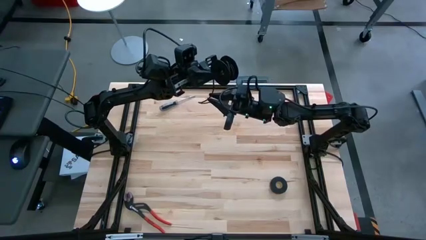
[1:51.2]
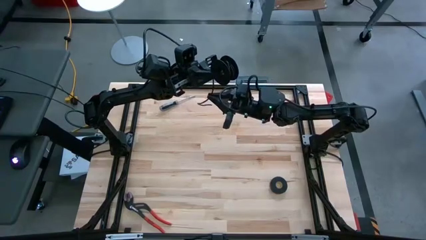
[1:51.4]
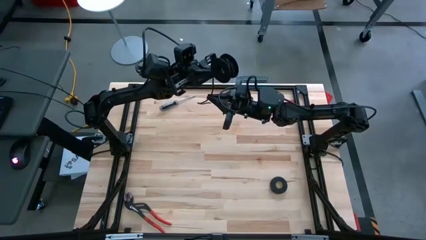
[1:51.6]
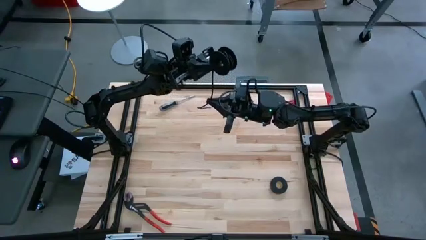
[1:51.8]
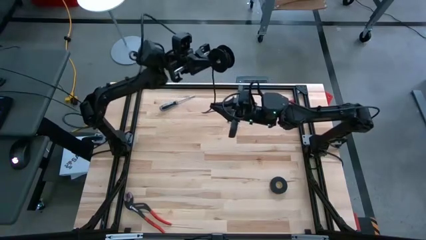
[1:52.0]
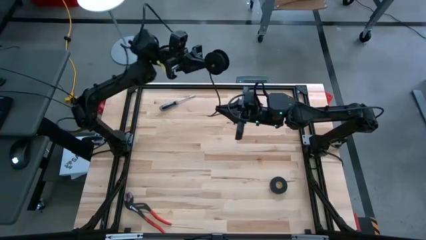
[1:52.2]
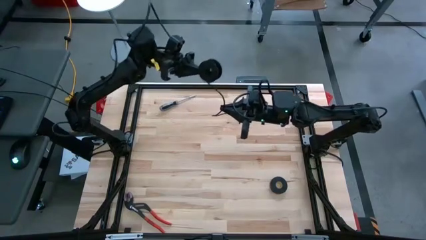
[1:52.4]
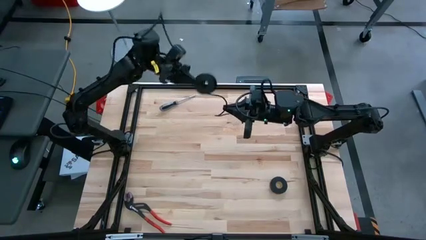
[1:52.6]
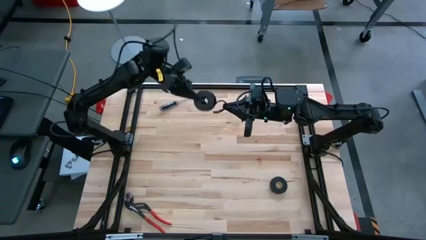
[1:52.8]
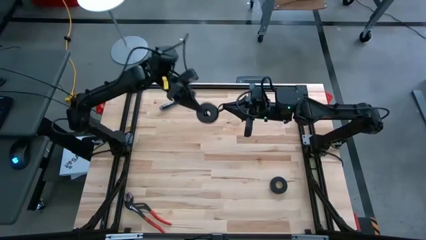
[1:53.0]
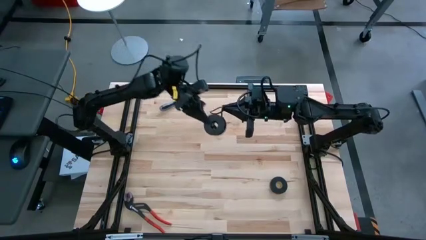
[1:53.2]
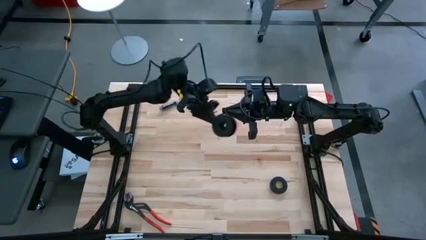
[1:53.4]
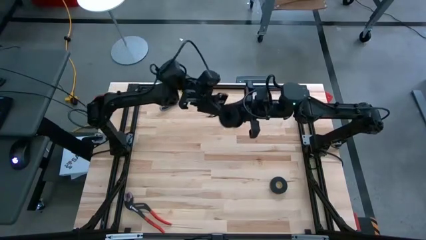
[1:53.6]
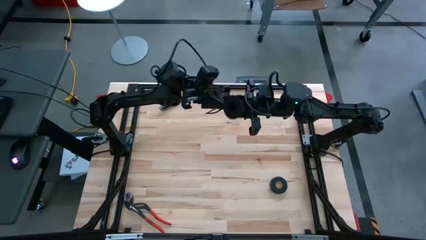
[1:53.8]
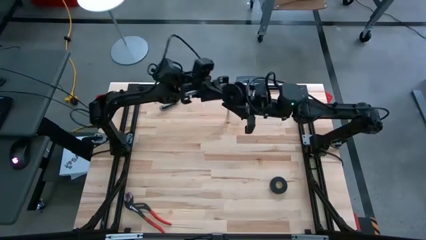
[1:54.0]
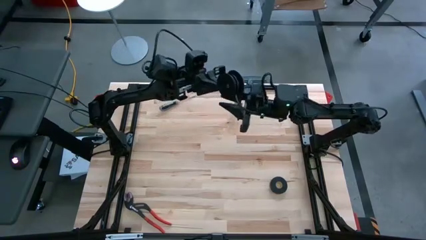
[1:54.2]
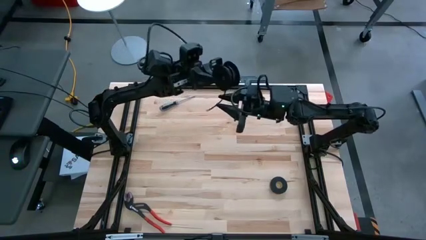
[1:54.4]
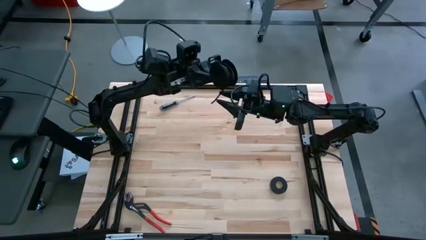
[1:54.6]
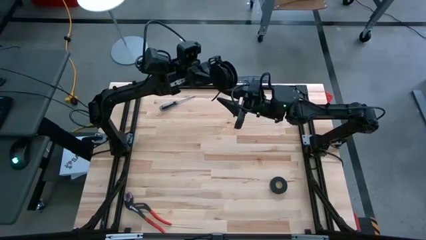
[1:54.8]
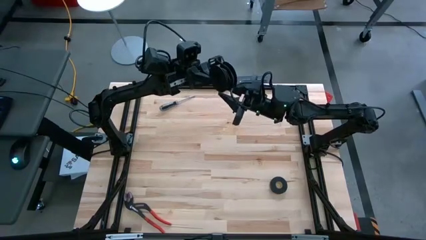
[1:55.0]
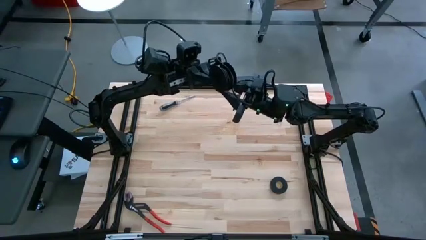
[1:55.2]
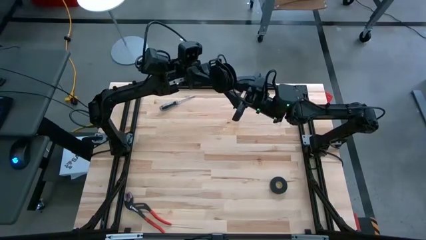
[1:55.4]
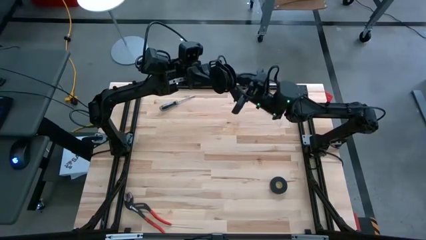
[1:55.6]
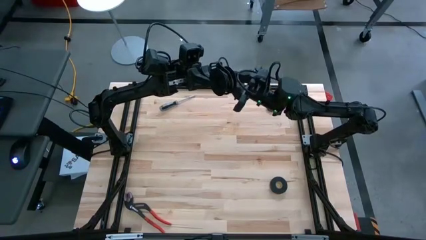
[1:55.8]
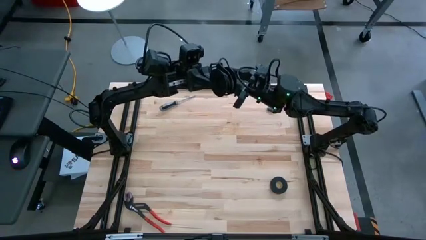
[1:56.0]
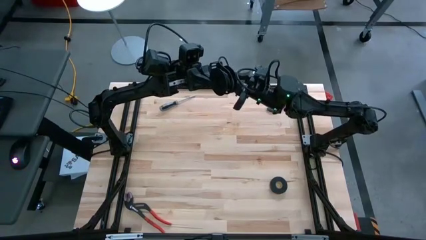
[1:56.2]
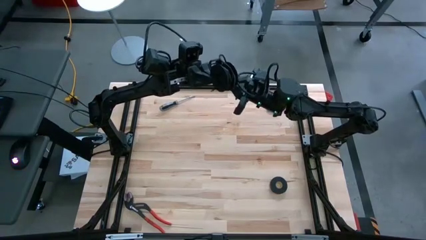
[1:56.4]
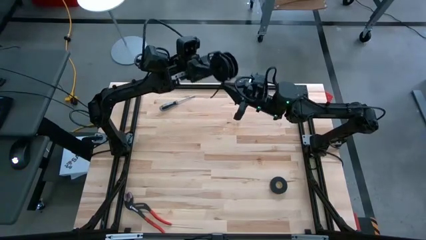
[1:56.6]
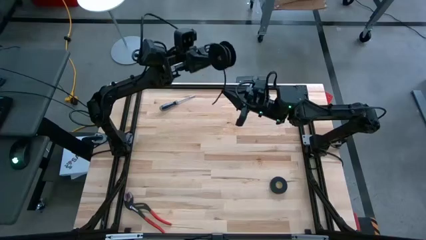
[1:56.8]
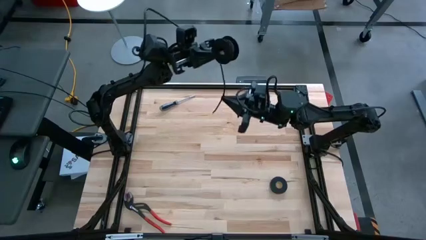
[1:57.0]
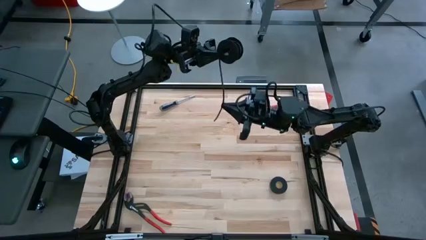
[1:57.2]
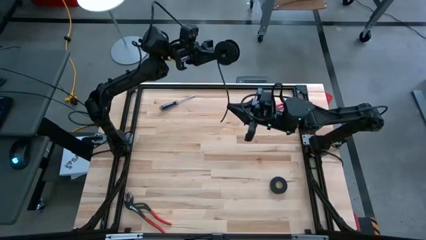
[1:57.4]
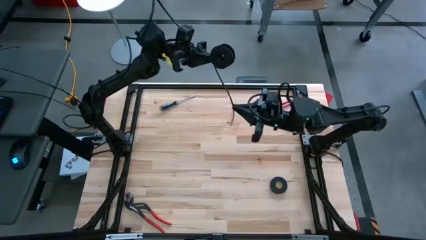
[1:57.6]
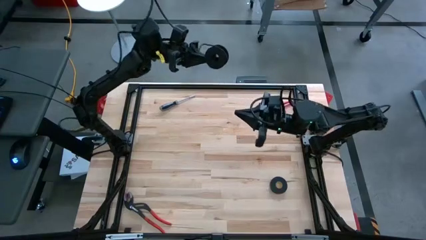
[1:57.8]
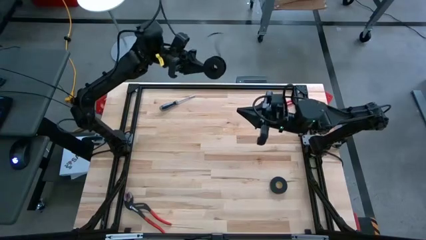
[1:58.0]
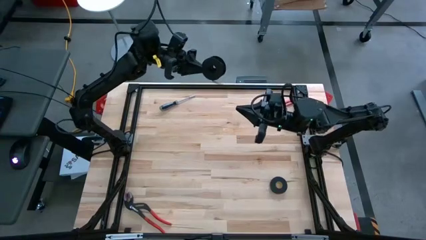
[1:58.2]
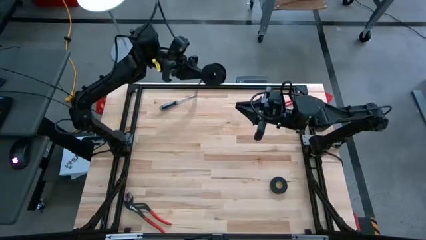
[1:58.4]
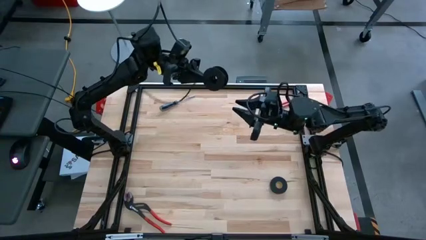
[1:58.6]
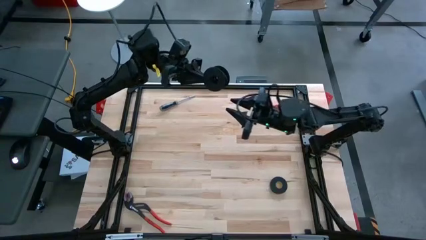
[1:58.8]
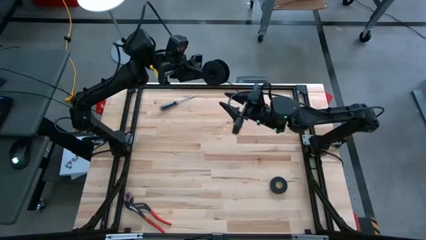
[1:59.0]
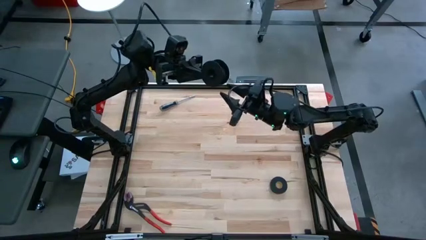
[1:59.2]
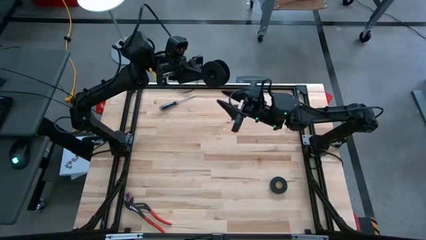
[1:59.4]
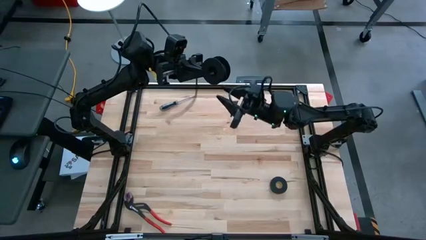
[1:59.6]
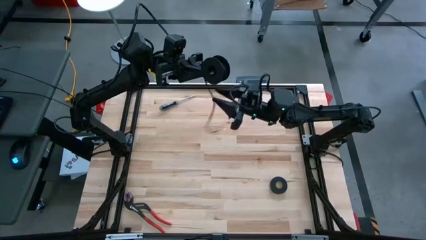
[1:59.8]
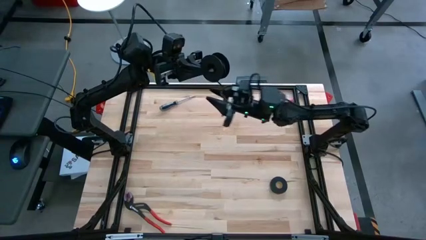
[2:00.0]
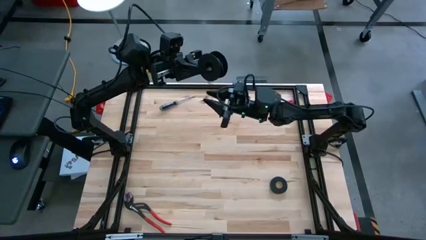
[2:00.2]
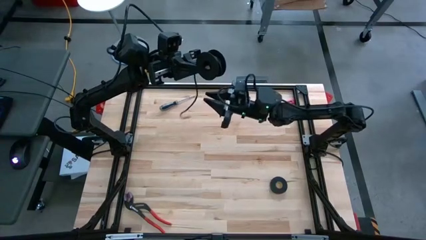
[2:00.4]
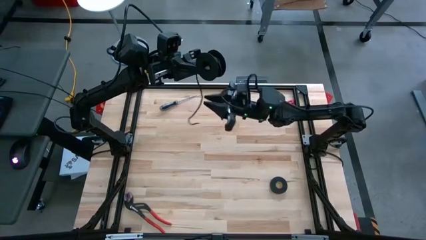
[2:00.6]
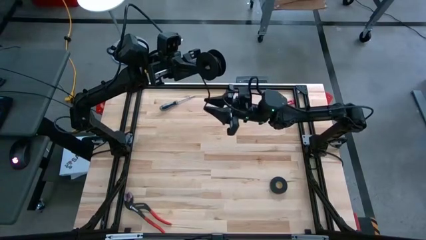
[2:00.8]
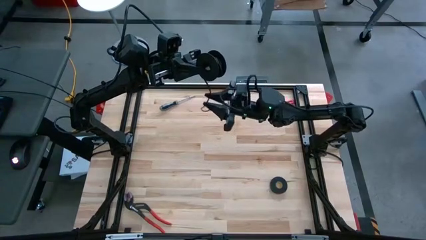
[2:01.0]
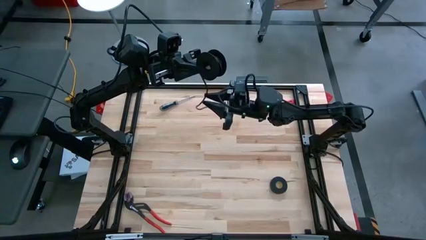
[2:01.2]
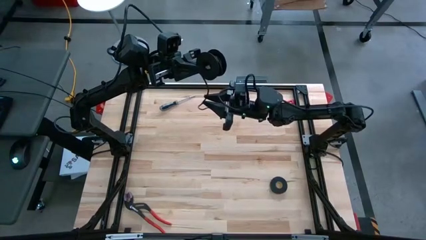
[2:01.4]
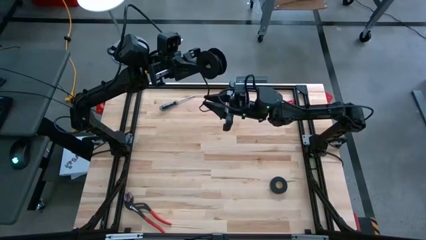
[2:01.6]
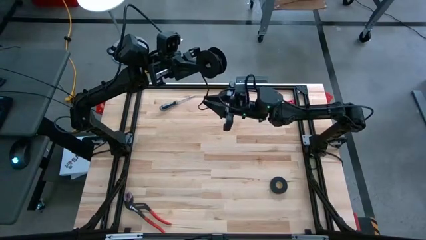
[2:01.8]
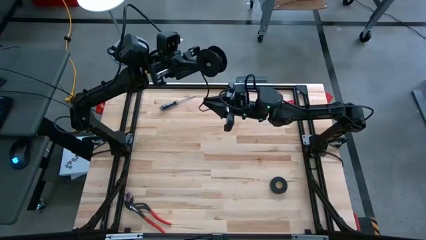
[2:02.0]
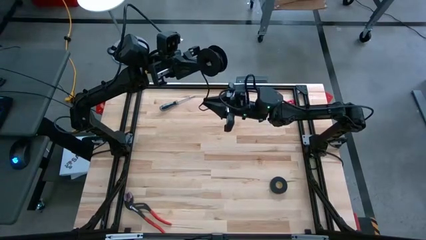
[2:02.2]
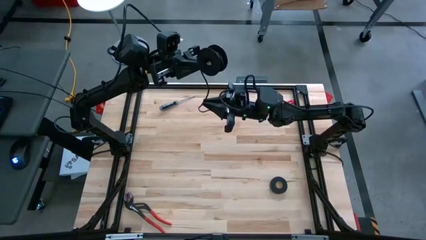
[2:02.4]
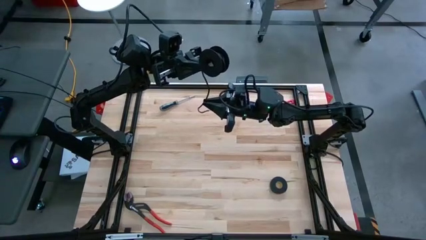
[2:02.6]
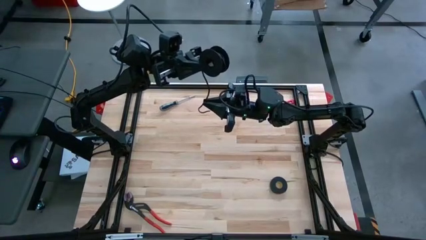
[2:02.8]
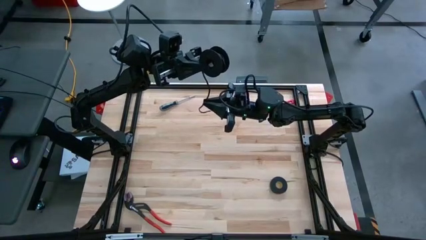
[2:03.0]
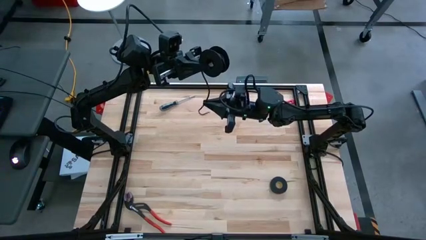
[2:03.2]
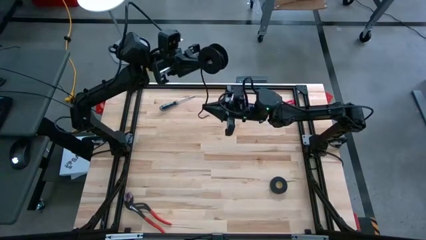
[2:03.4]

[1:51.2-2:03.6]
Task: Coil cords
Coil the black wire on the black spool

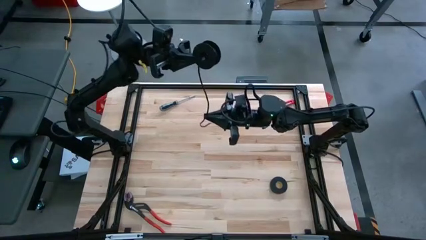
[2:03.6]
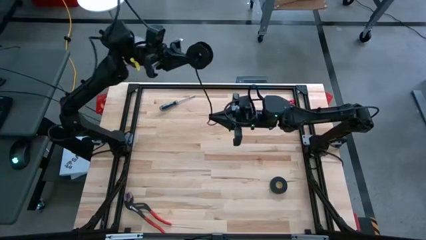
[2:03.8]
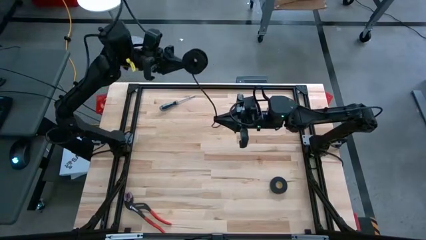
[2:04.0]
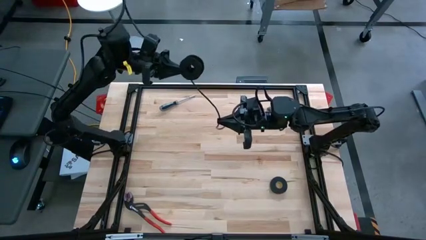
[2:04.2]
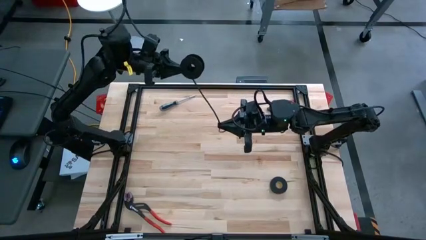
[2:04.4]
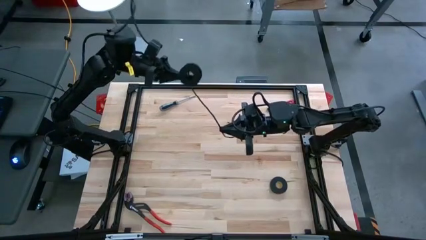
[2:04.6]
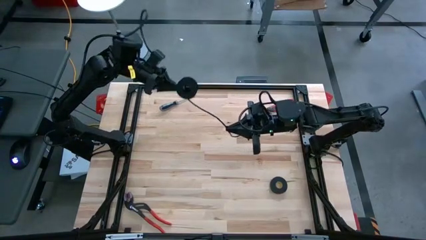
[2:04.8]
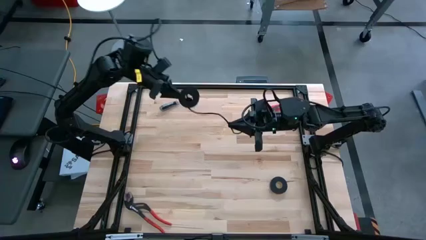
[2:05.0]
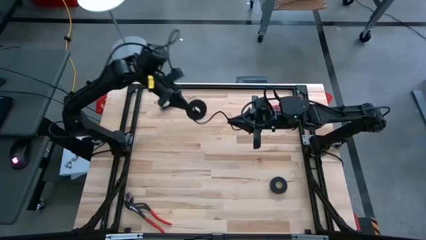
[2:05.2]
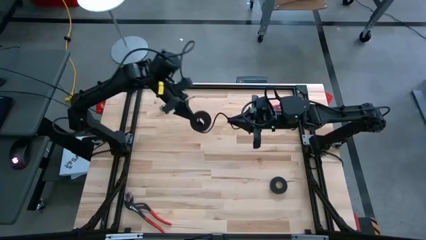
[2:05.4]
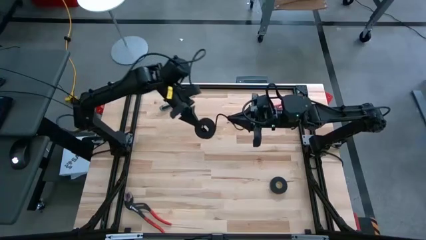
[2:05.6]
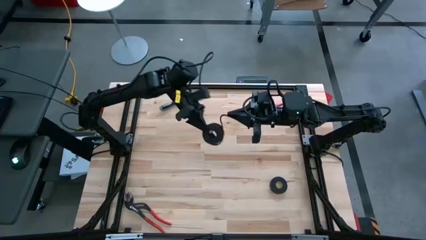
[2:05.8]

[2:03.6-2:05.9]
Coil the black wire on the black spool
